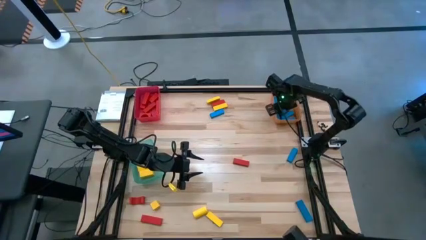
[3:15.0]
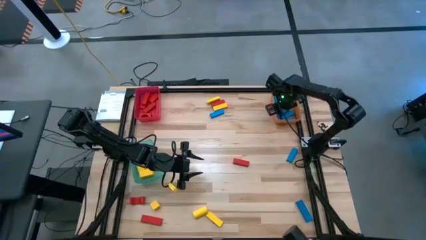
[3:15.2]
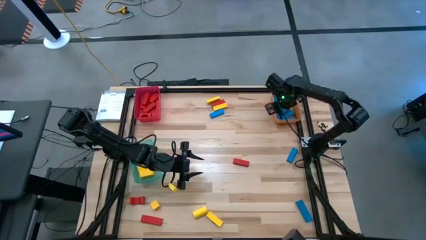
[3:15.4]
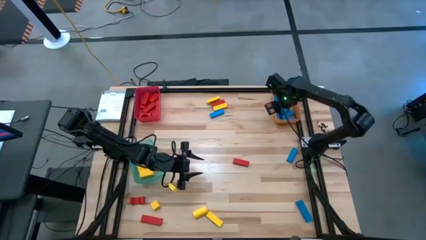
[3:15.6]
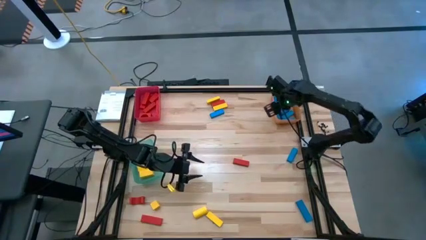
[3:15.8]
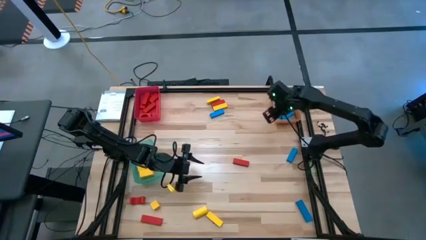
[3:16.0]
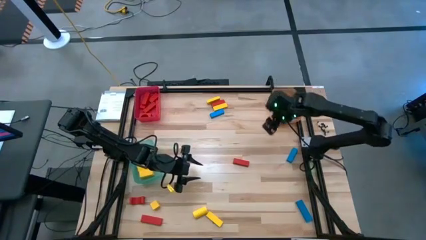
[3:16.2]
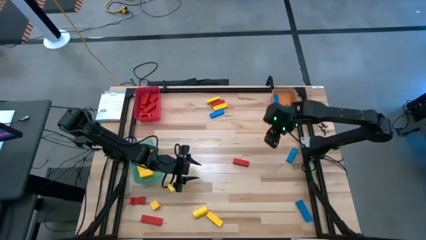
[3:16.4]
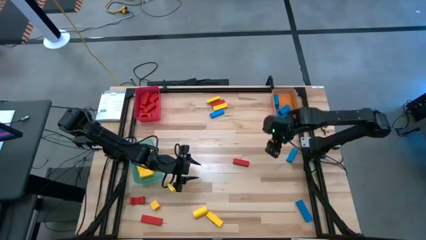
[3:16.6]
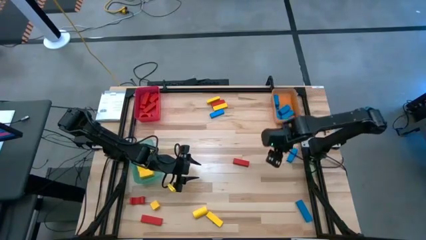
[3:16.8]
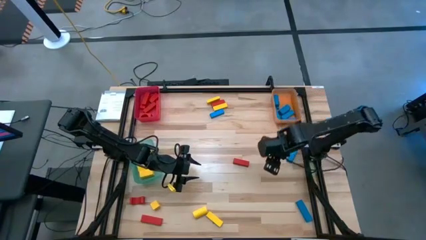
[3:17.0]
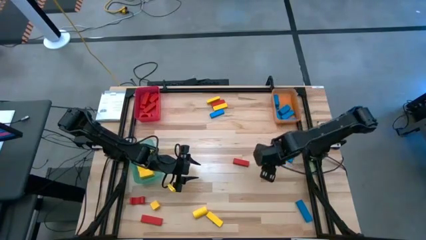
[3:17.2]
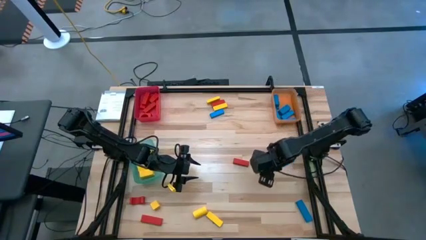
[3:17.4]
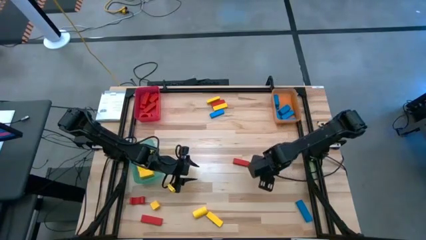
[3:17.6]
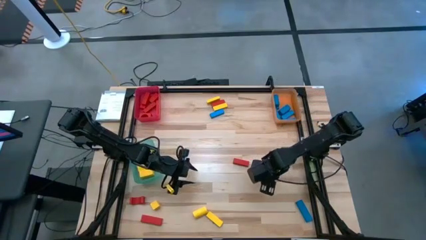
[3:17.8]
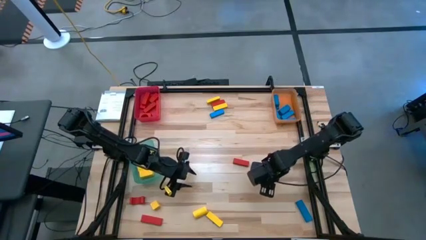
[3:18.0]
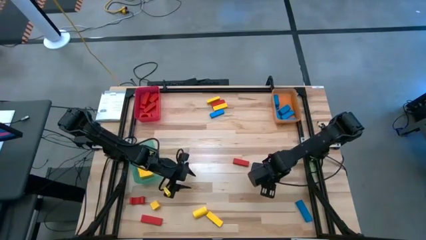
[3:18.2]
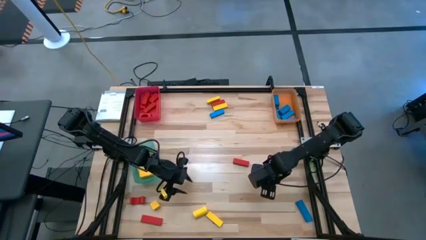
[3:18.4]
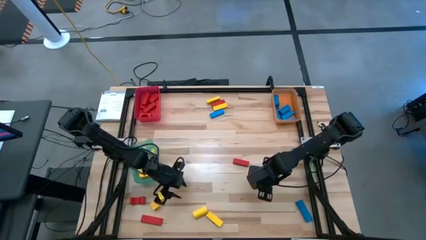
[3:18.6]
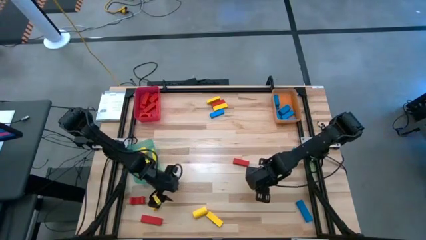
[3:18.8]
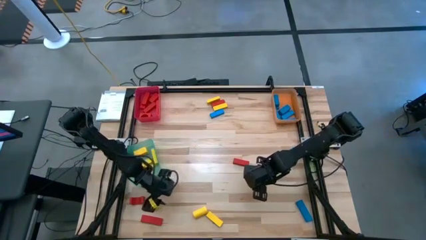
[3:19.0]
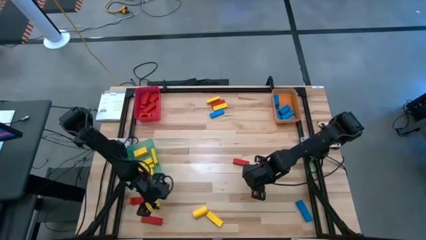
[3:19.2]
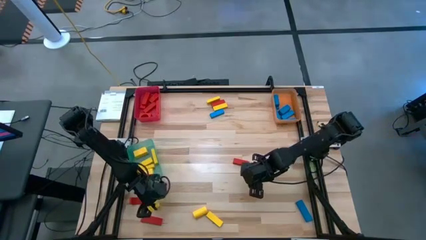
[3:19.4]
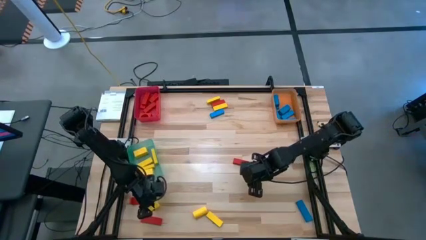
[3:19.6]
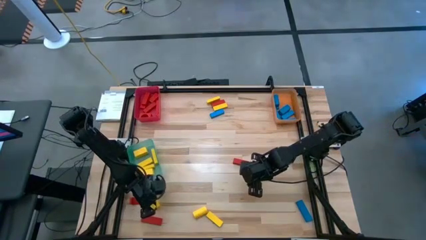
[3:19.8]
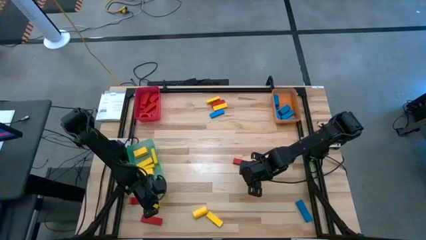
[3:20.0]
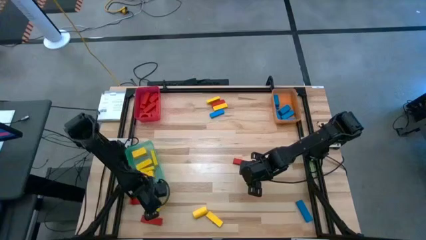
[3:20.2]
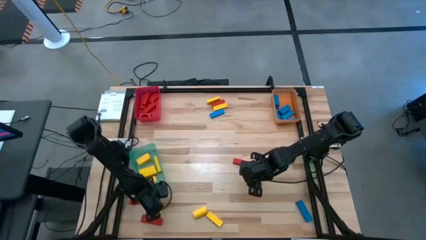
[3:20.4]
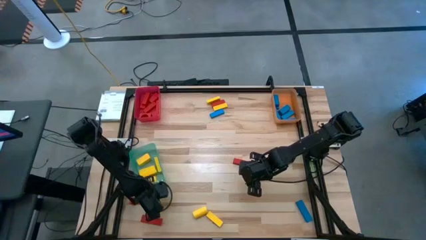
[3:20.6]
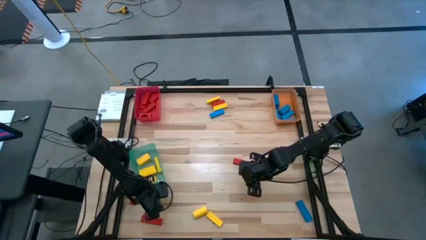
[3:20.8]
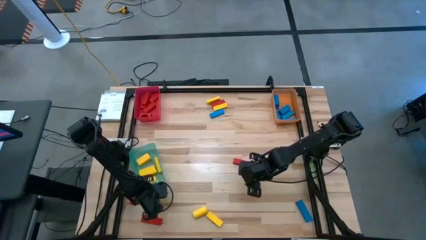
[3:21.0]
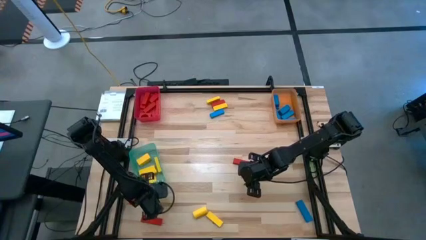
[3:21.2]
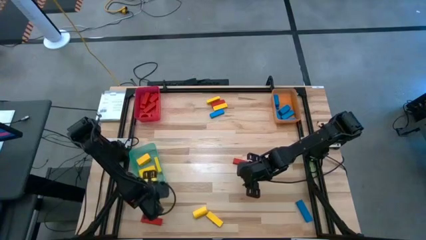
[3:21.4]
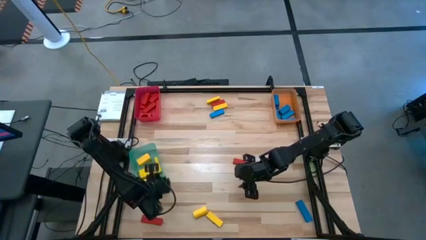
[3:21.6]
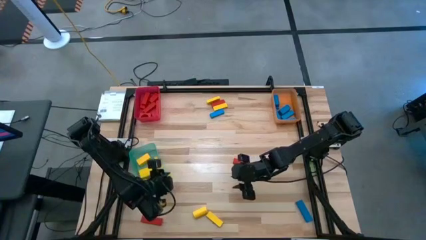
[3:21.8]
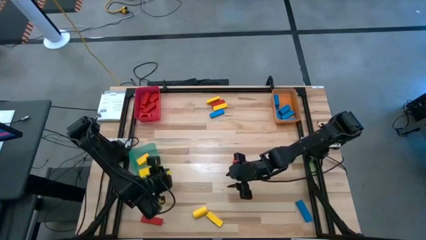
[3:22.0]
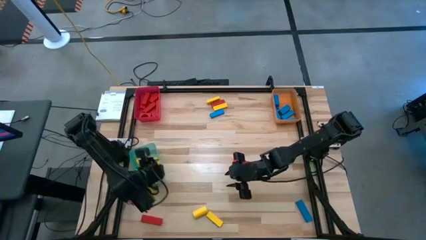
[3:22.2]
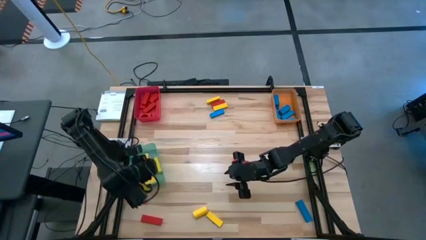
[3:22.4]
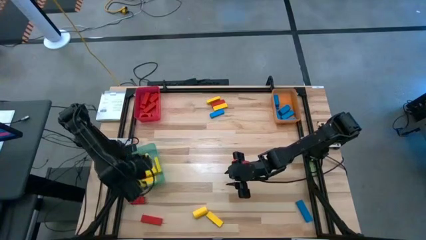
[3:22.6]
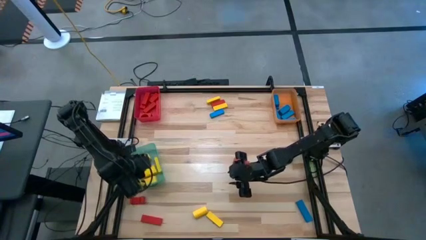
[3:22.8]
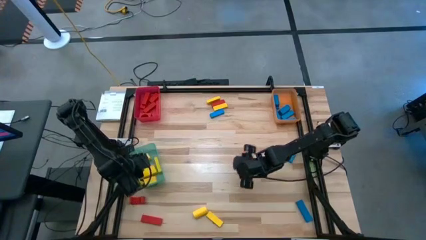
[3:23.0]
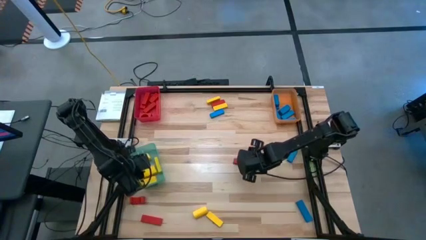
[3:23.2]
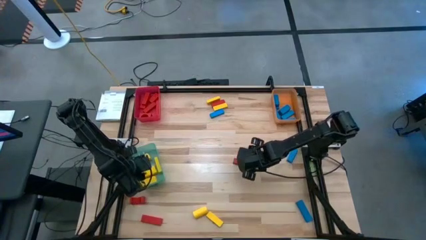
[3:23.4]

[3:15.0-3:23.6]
Task: Sort blocks
Put the yellow block into the green bin

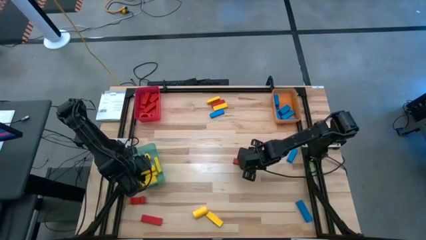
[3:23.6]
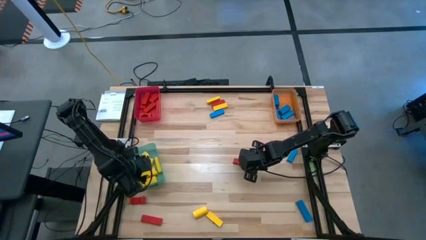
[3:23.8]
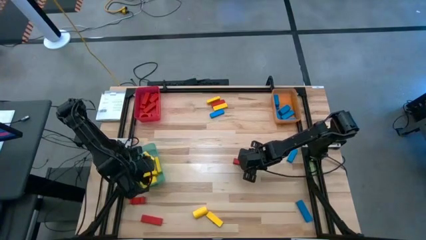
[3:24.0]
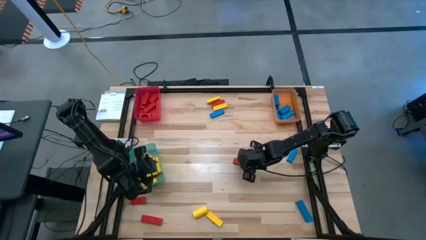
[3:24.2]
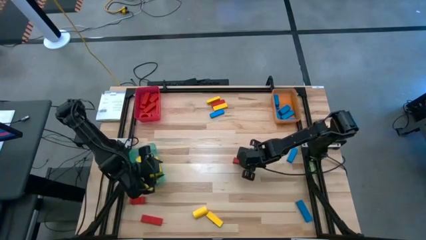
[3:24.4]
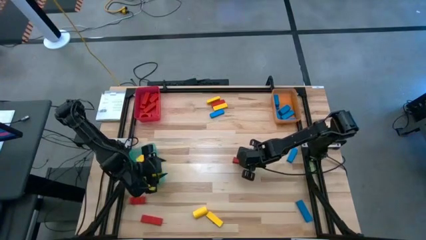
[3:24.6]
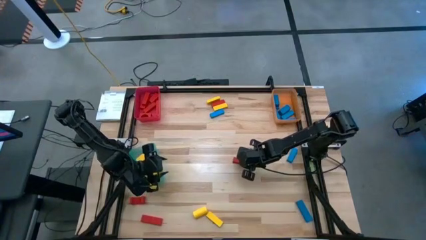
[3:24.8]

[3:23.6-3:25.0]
Put the red block into the red bin

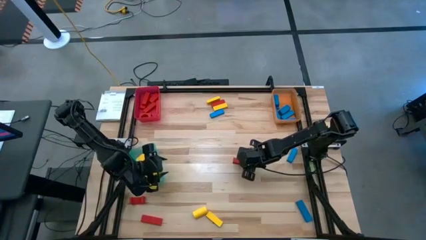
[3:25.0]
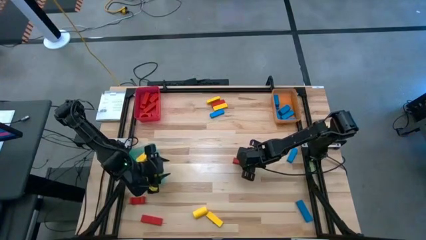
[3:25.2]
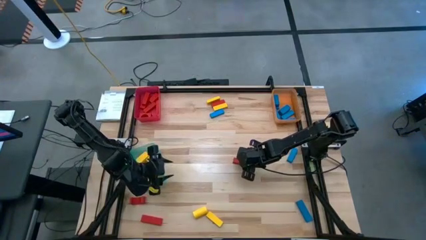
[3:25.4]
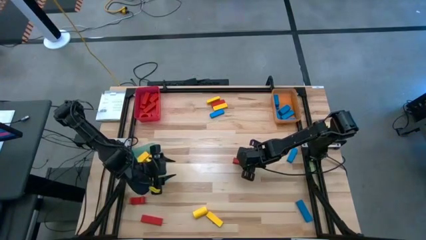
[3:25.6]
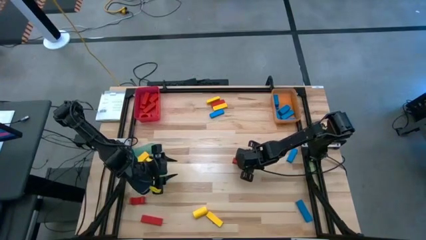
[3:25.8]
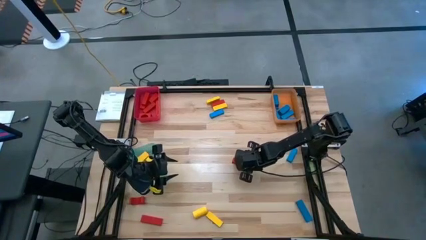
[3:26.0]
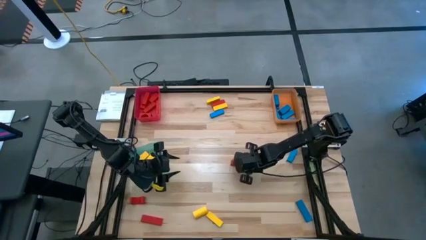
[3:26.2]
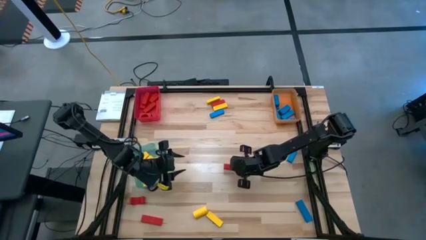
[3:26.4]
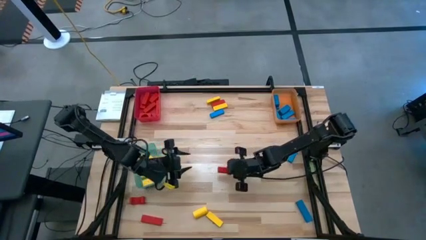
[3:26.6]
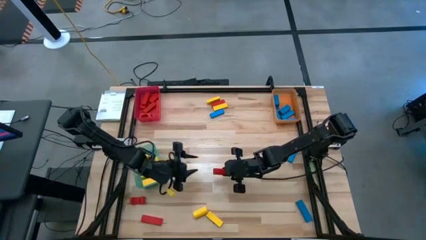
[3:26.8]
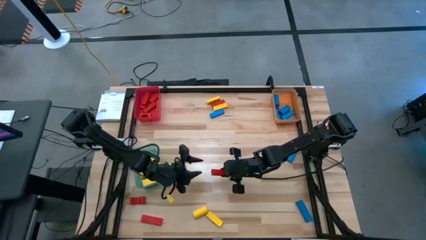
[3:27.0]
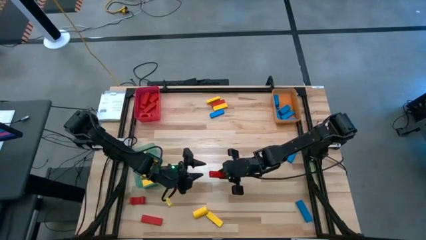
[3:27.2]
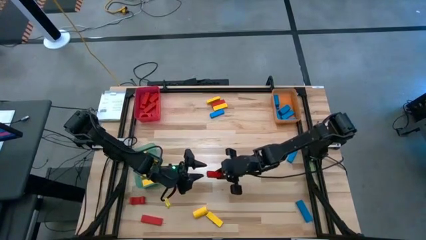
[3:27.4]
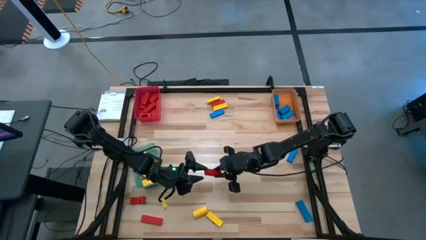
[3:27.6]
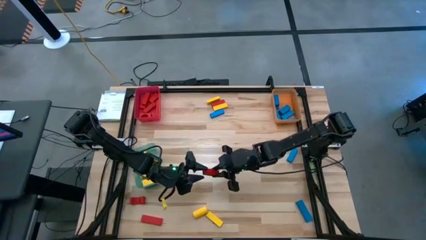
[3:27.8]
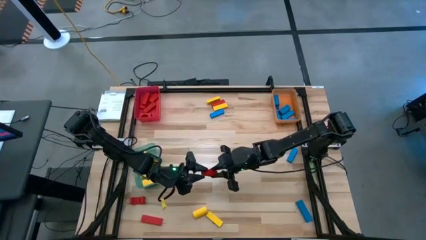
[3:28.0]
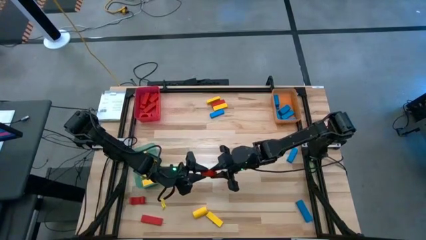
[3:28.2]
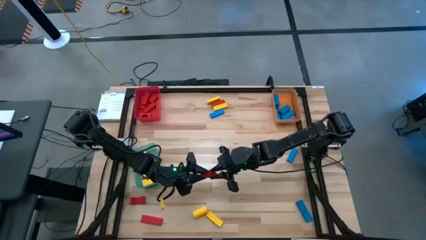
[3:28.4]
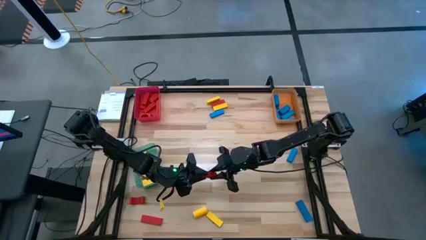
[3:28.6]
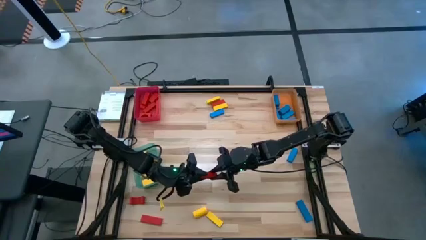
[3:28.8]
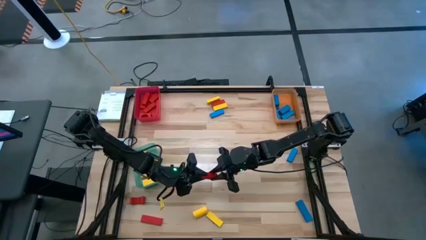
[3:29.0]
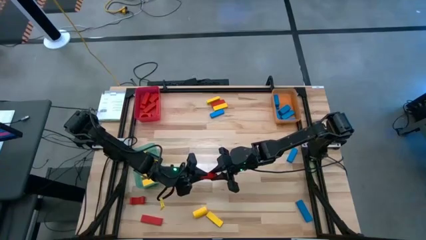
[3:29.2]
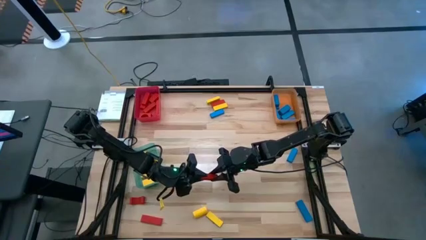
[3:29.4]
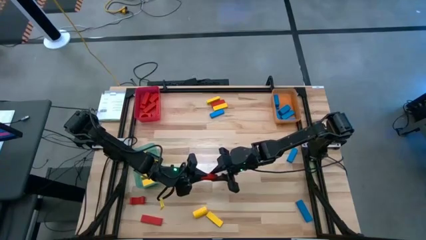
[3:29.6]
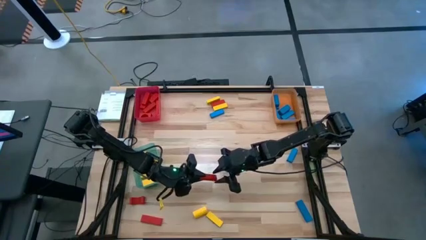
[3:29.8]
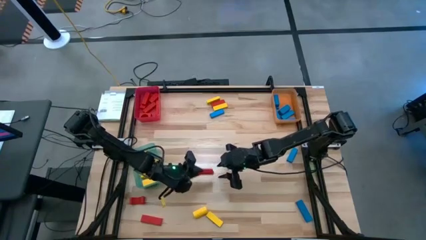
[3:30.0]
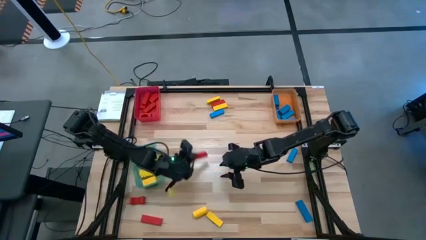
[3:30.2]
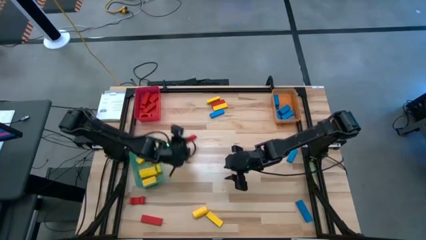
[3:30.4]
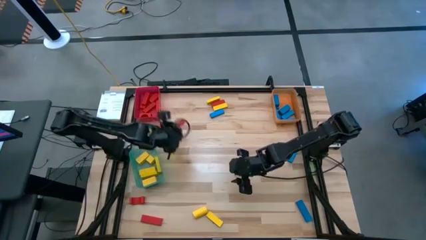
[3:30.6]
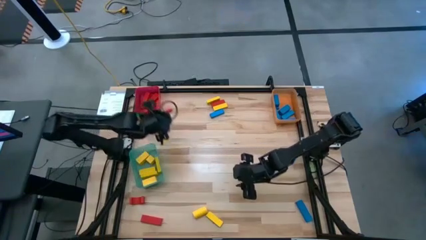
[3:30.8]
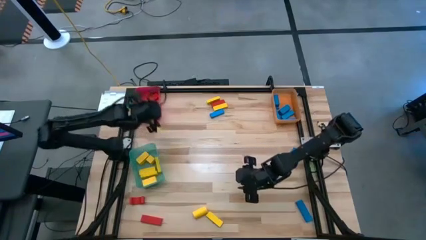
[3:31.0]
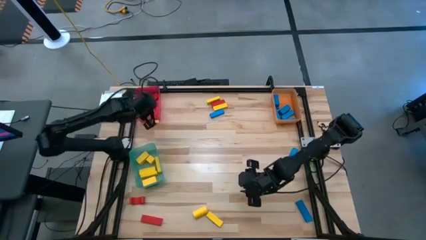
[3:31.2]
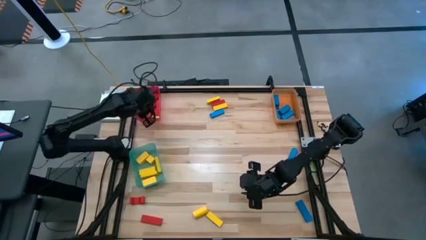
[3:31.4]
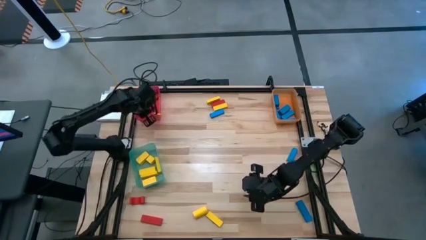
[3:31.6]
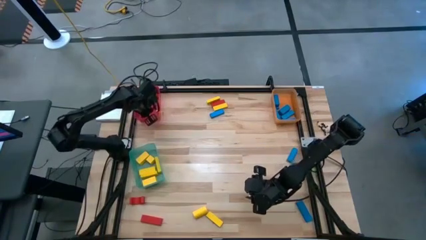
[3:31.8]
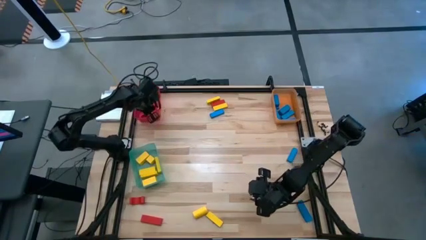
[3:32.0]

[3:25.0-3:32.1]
Put the red block into the red bin
